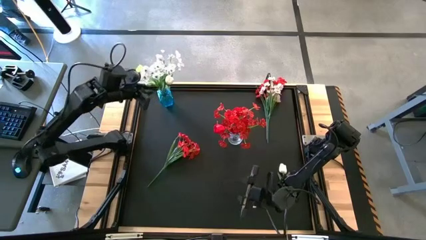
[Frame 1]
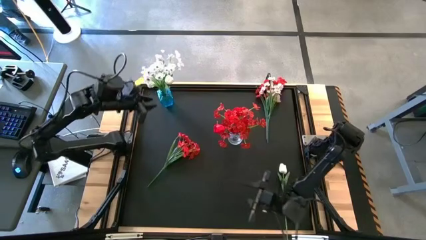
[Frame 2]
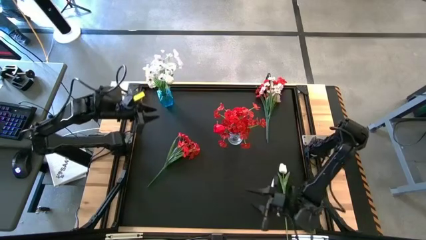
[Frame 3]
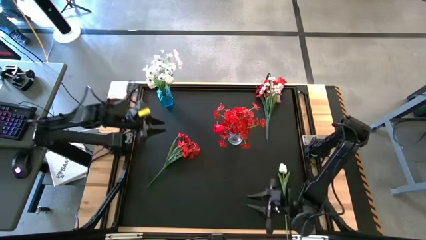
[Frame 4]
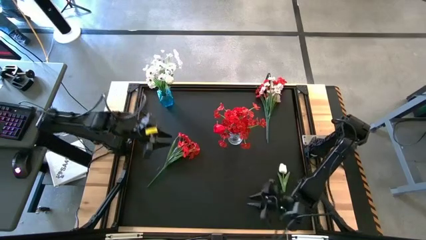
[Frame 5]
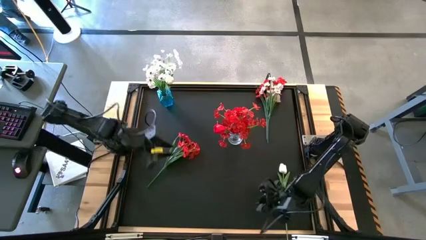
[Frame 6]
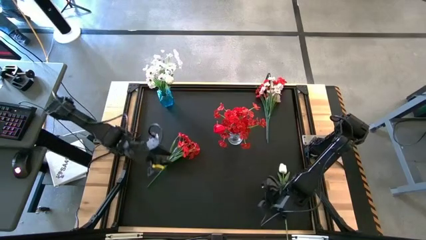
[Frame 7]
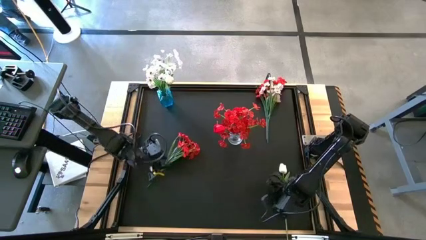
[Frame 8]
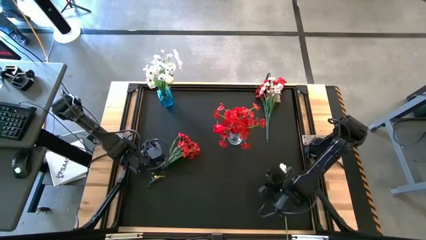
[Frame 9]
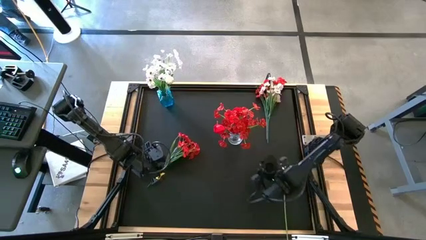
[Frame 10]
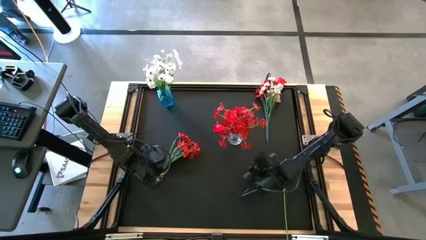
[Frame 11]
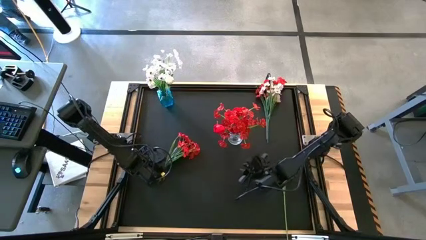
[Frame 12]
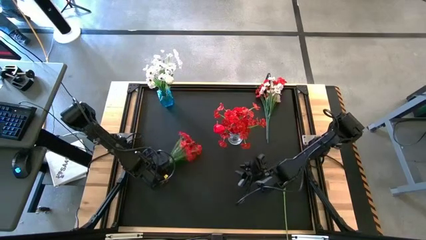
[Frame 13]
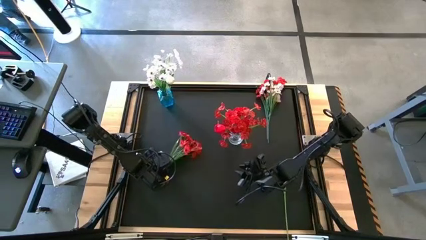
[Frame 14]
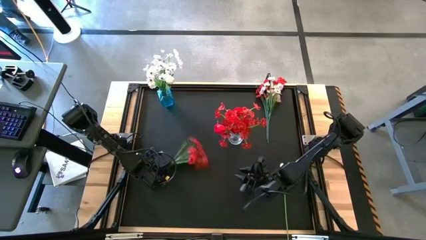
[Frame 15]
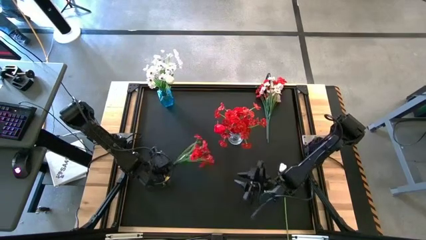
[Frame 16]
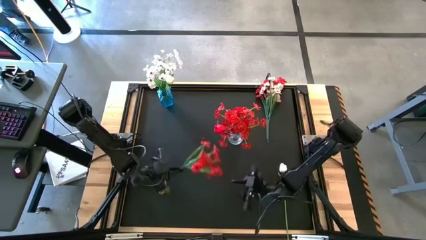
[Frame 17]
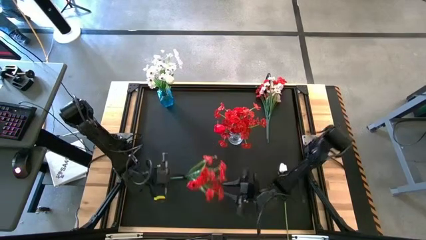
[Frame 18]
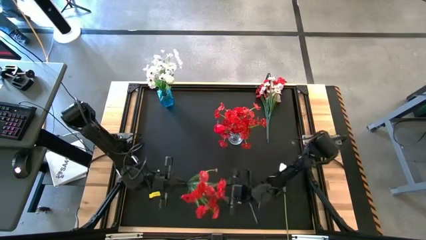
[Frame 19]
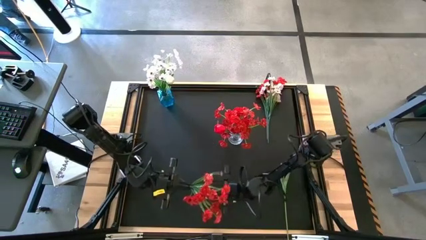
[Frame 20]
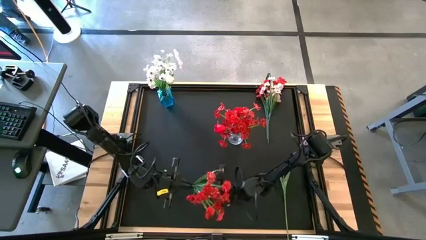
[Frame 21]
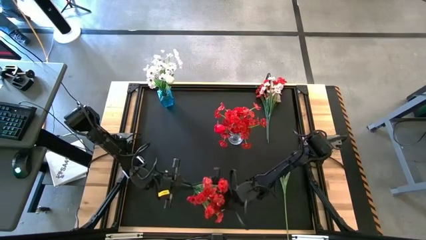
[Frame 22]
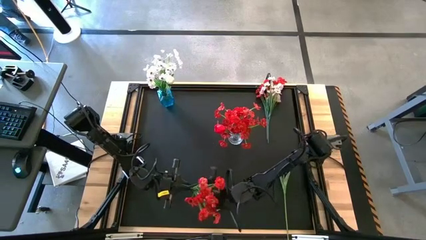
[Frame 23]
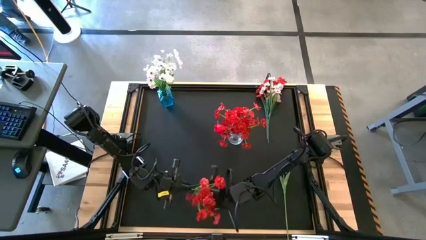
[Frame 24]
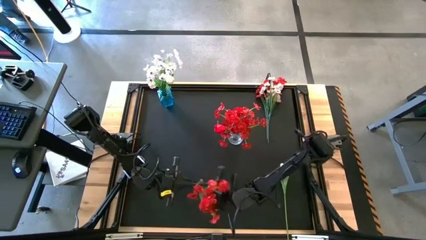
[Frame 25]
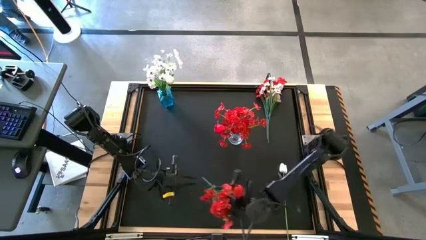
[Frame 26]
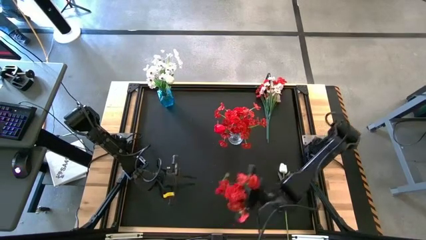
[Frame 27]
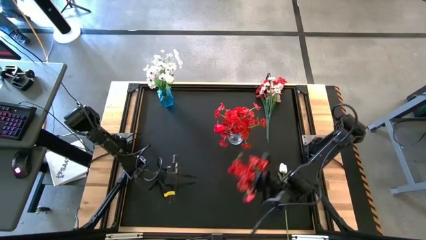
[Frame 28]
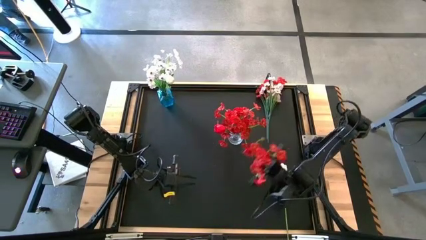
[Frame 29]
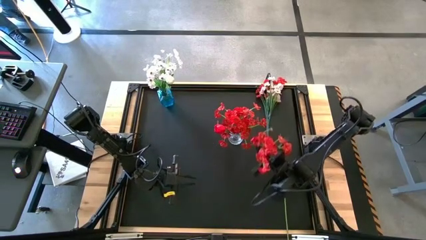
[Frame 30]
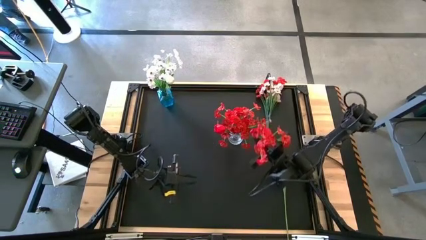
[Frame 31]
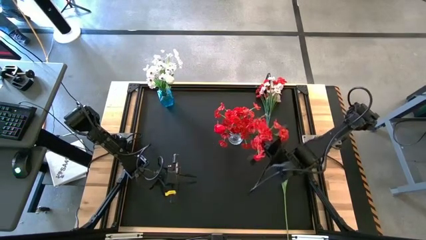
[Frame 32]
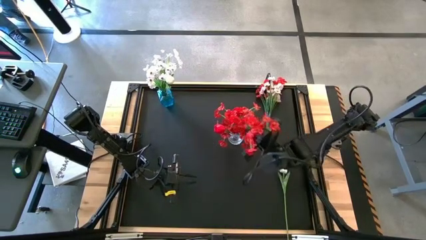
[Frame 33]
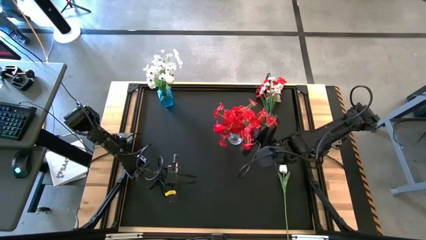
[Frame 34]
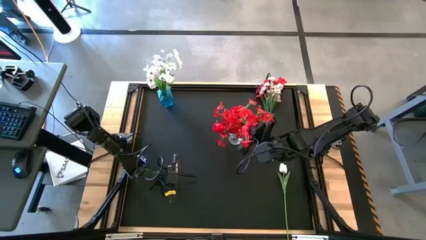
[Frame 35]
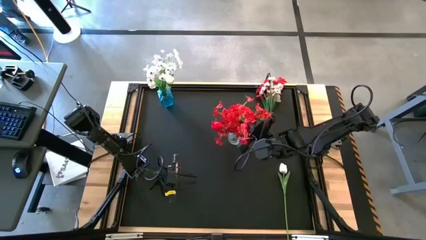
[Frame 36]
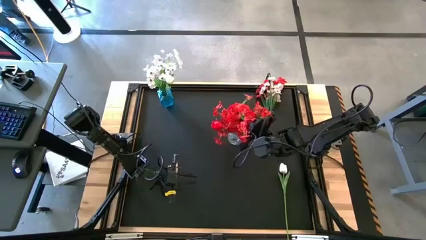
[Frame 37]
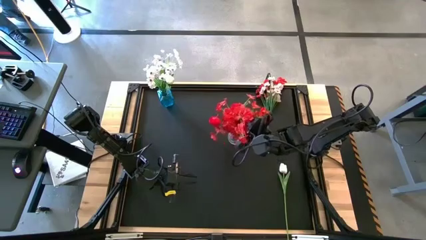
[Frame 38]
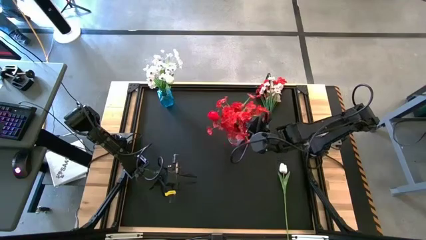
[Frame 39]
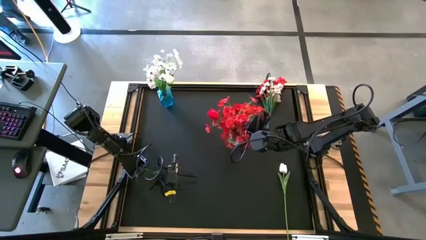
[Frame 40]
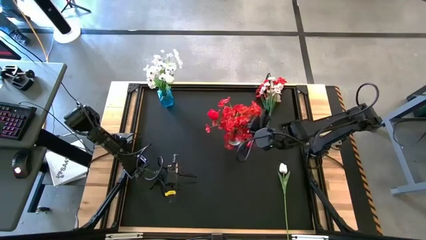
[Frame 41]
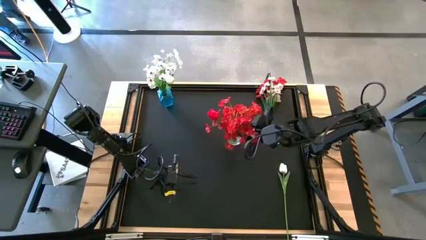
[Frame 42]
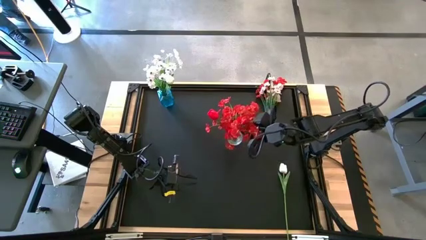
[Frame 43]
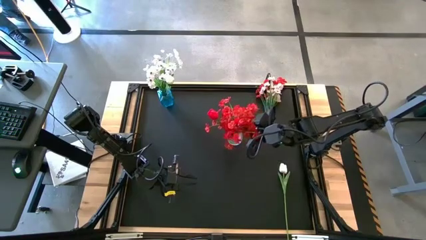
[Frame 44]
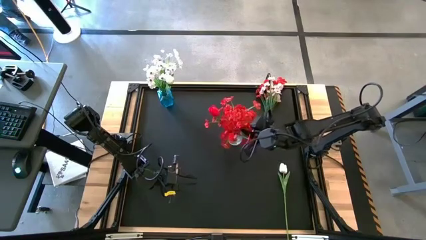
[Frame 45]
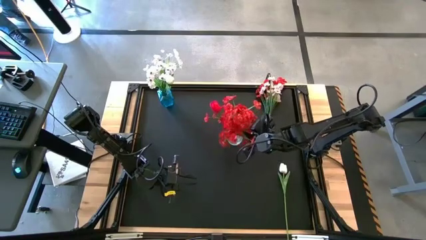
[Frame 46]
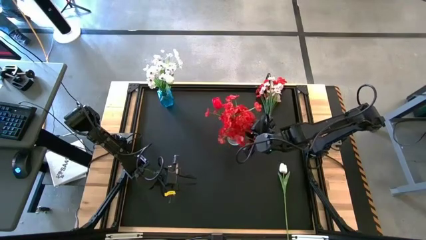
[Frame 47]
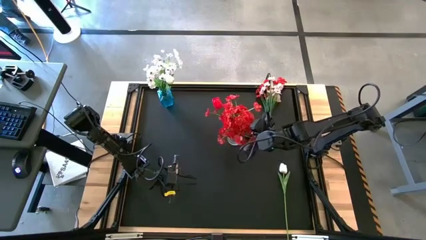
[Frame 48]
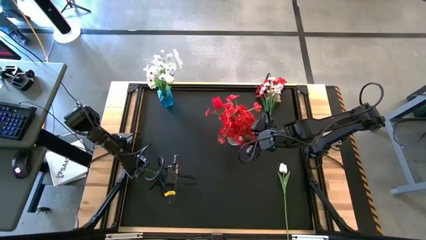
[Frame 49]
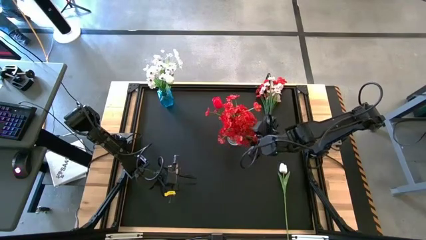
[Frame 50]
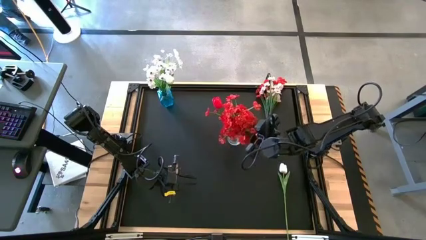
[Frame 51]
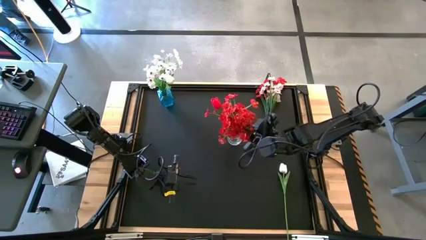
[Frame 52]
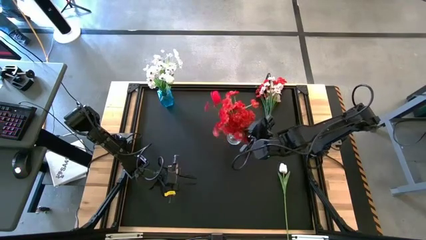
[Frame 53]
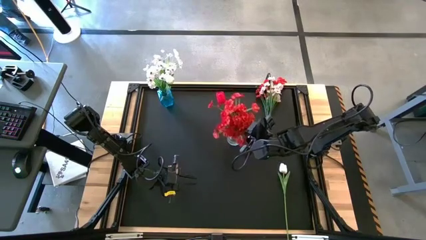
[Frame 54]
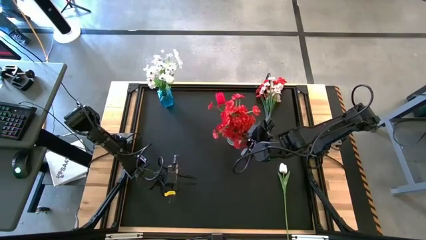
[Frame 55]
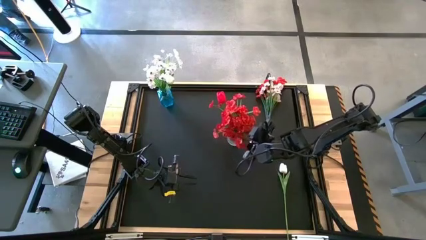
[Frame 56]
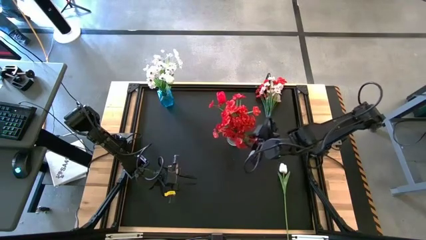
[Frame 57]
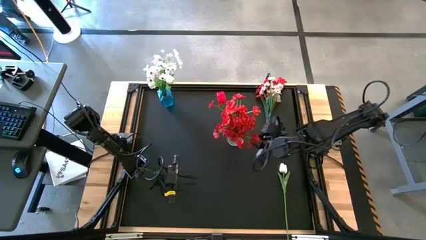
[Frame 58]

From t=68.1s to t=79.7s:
Task: Sort flowers into vase by color
Put the bottom red flowers into the transparent vase

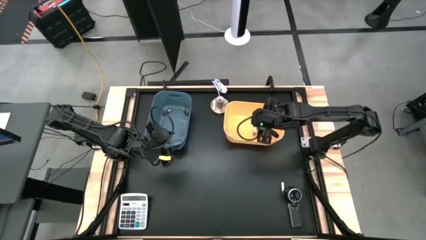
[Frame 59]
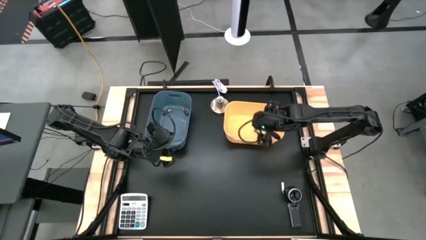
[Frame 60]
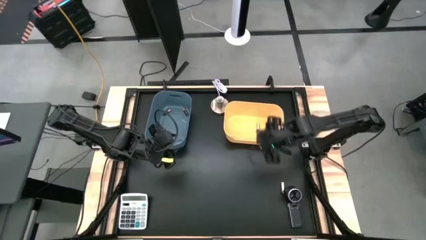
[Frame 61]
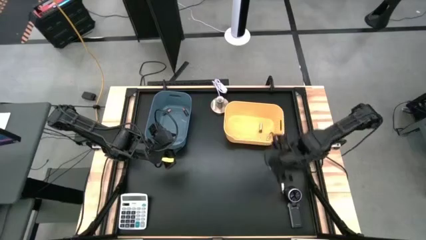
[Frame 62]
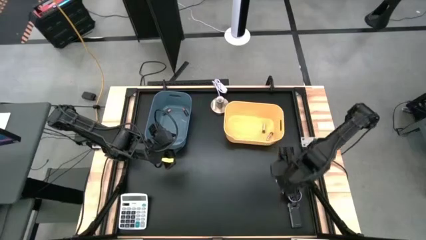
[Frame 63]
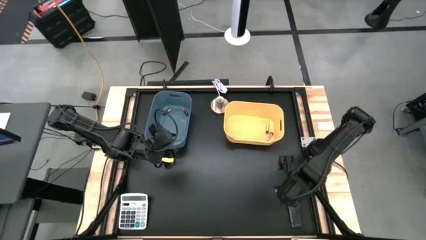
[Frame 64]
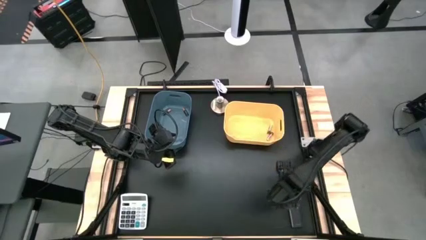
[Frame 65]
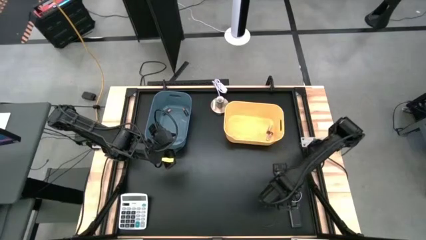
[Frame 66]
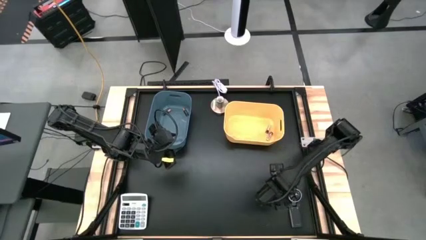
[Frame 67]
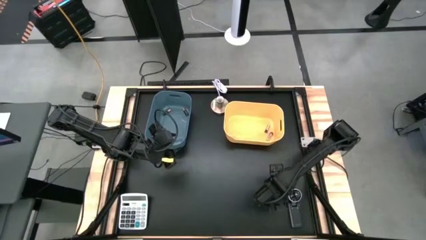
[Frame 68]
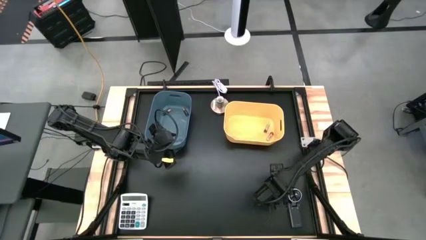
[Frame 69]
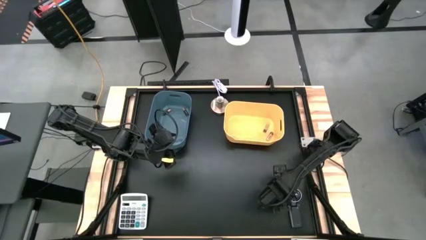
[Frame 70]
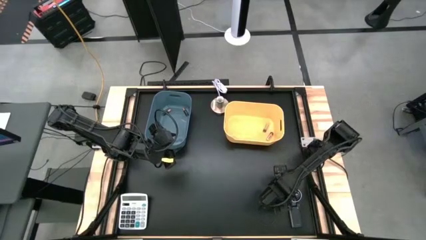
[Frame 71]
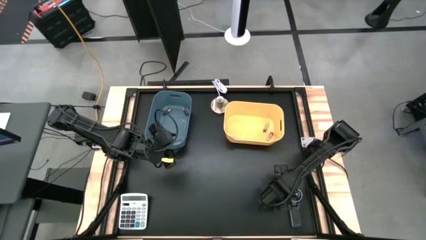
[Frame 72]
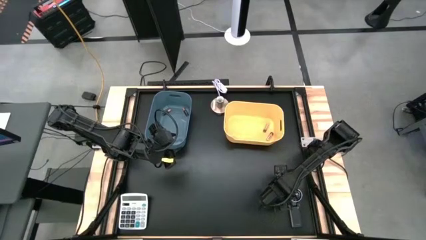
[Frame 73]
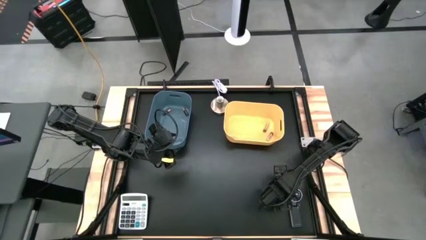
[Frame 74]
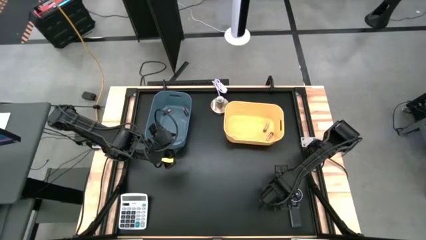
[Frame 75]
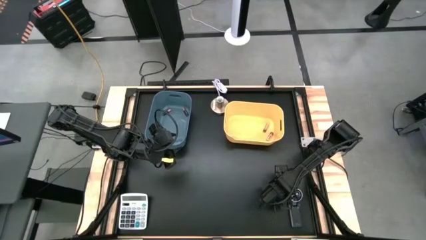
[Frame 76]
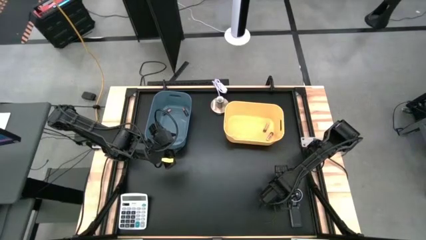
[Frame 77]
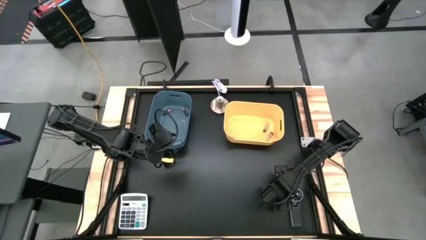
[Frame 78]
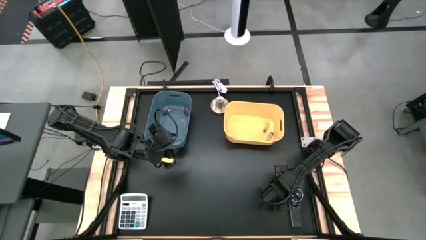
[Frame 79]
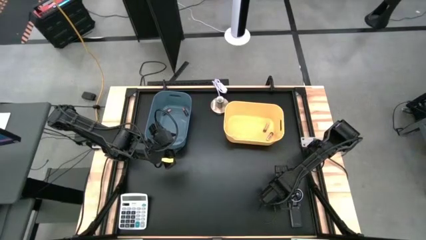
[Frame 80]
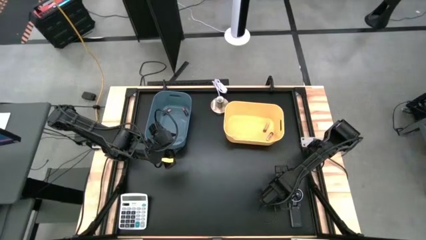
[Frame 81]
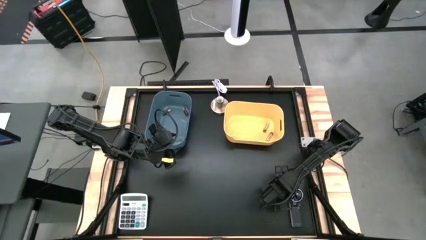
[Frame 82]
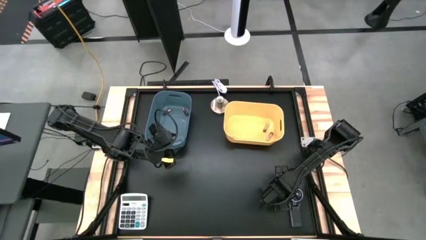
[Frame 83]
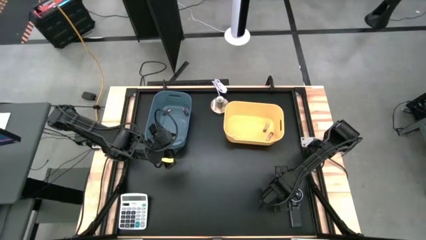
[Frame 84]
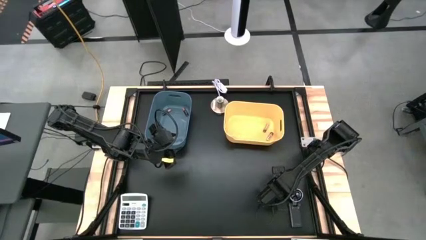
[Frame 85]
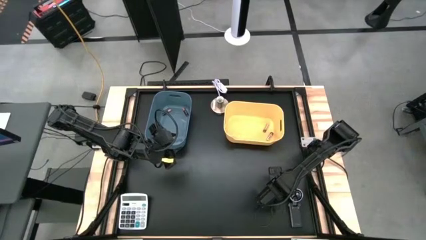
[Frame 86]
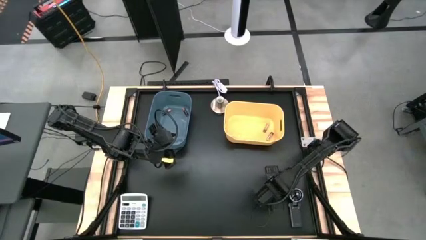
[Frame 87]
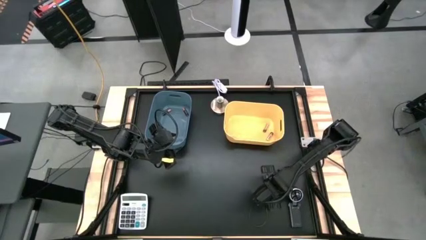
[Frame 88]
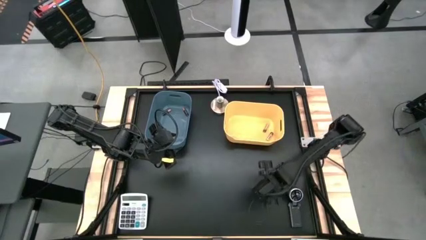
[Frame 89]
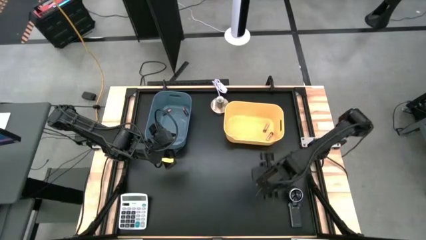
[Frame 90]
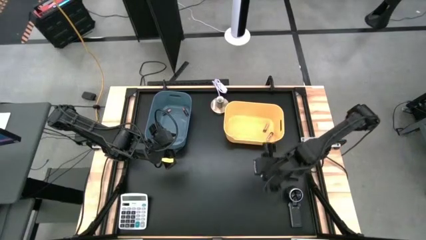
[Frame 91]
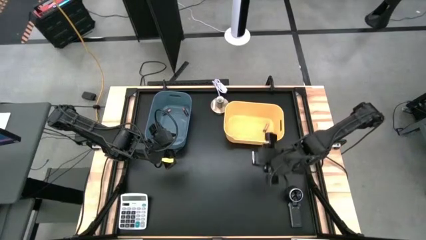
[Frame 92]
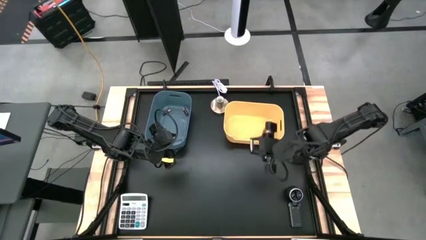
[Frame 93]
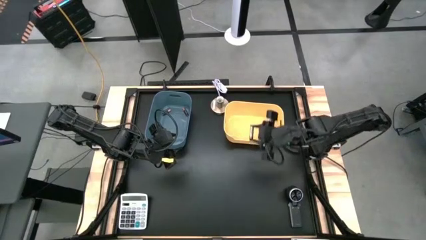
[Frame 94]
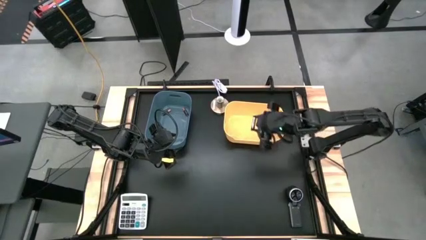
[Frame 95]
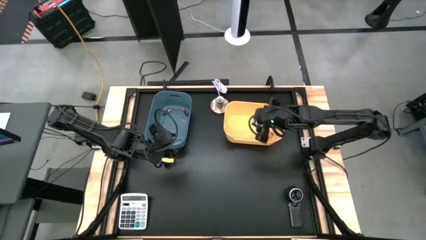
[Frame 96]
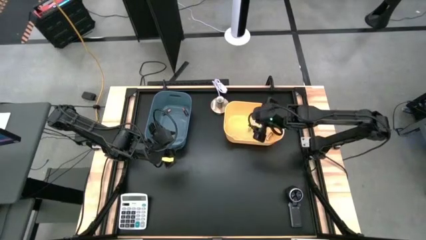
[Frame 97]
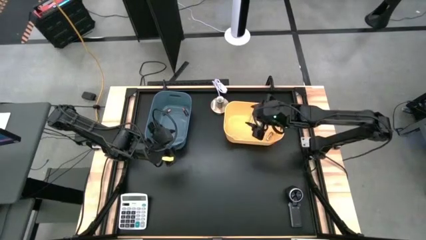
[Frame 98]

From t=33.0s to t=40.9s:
Task: Sort batteries
Put the silver battery into the yellow bin
